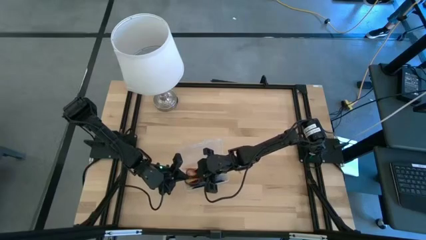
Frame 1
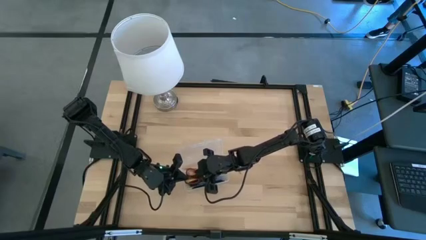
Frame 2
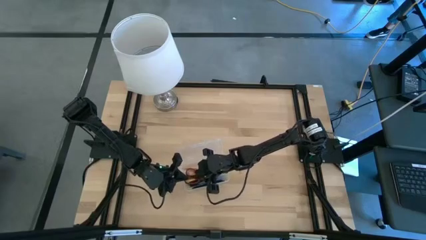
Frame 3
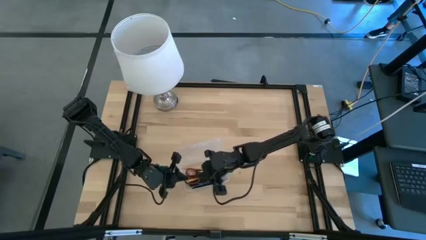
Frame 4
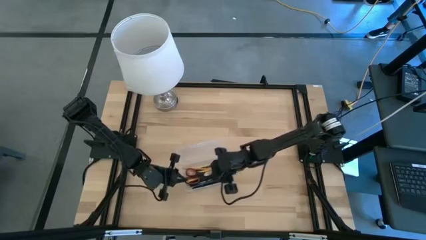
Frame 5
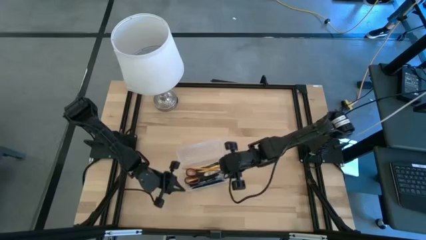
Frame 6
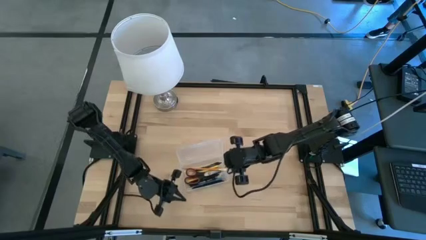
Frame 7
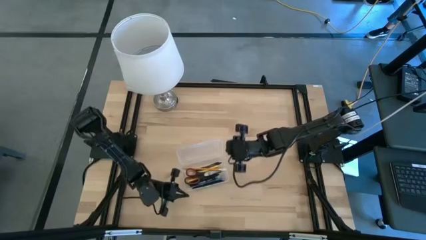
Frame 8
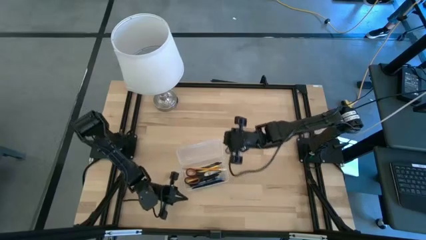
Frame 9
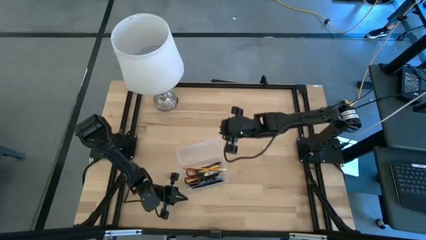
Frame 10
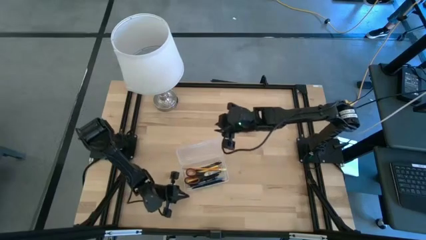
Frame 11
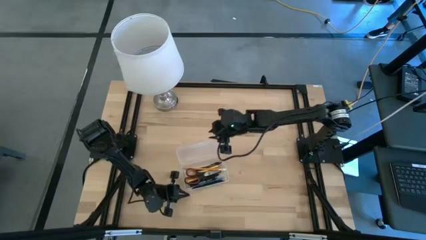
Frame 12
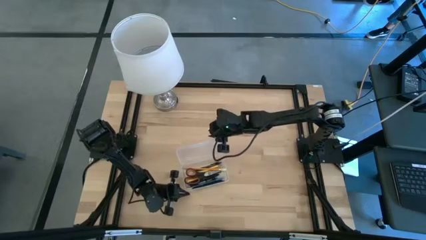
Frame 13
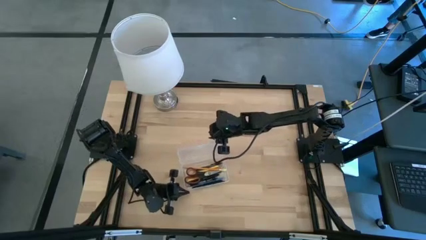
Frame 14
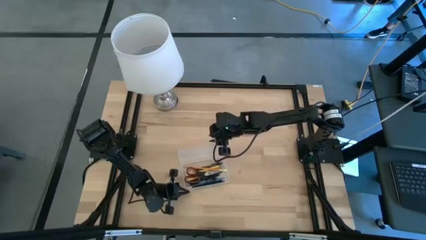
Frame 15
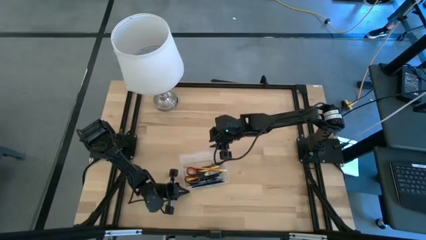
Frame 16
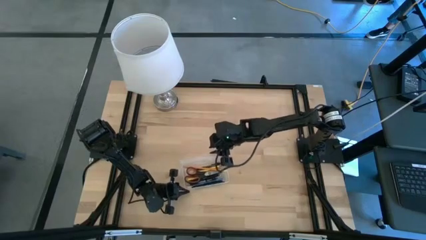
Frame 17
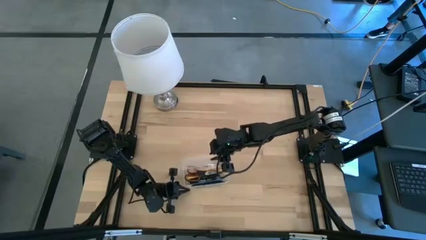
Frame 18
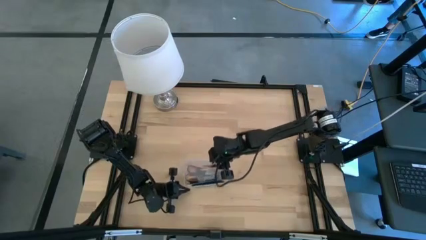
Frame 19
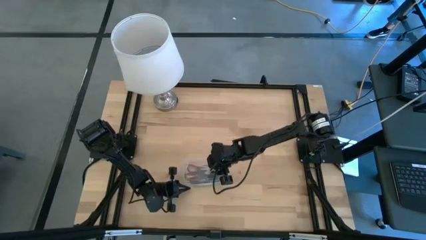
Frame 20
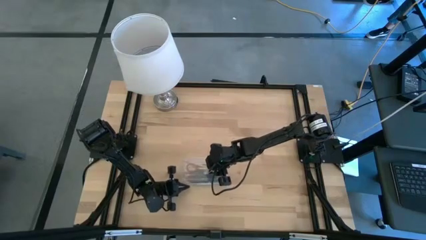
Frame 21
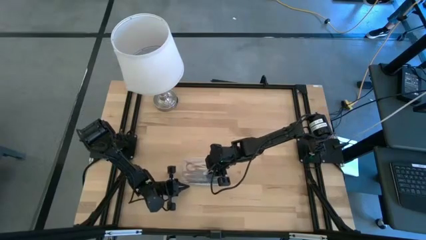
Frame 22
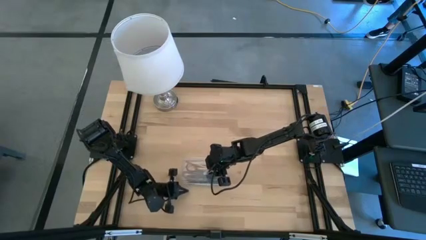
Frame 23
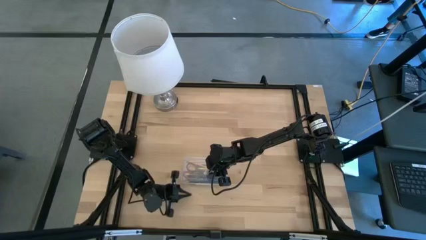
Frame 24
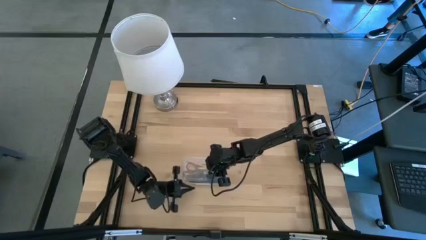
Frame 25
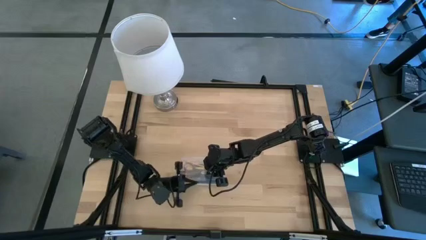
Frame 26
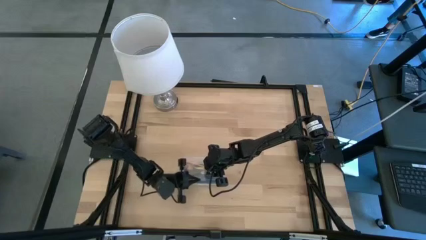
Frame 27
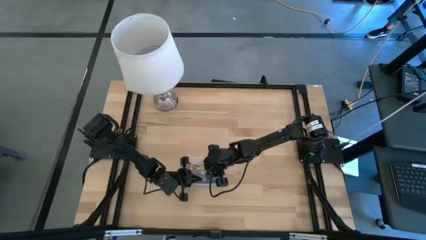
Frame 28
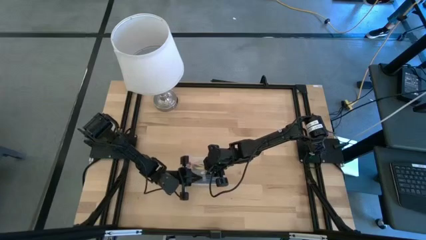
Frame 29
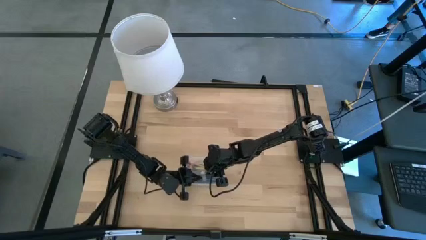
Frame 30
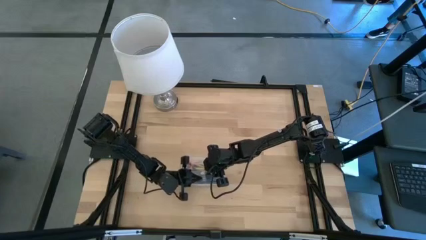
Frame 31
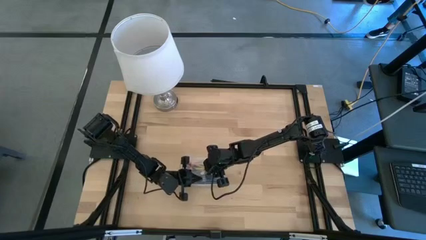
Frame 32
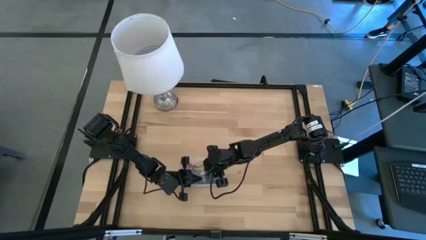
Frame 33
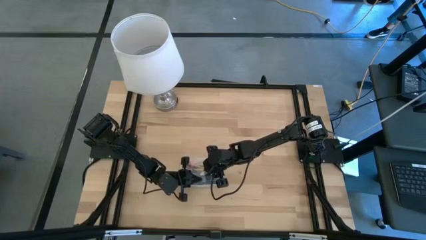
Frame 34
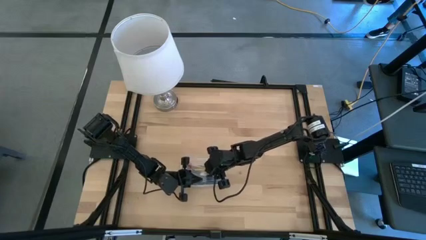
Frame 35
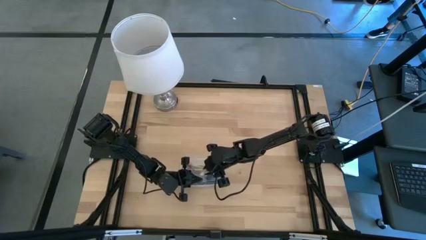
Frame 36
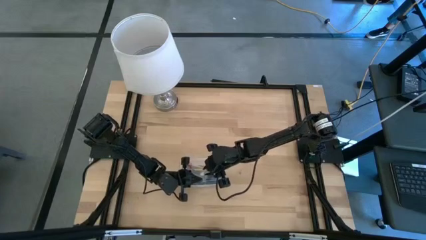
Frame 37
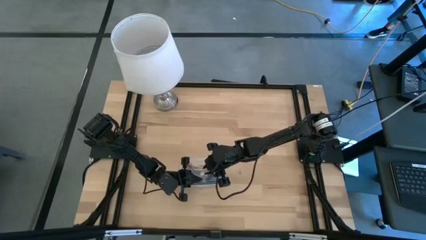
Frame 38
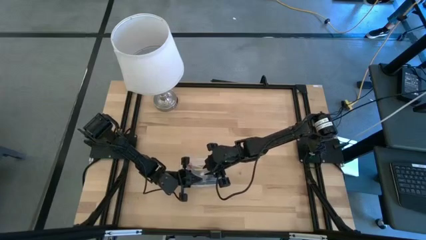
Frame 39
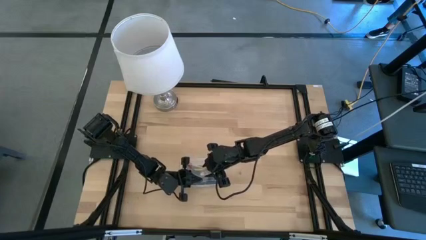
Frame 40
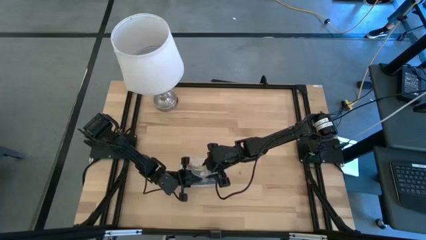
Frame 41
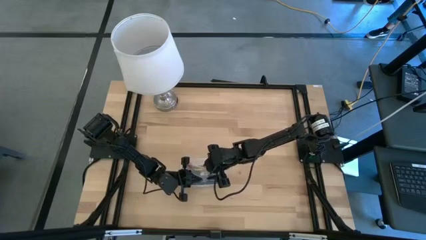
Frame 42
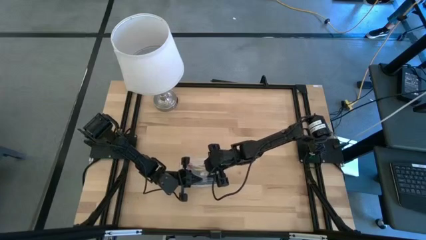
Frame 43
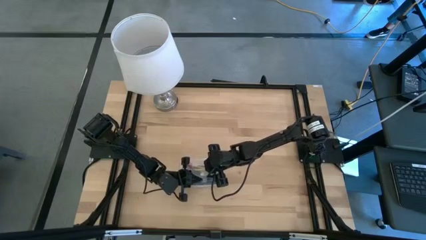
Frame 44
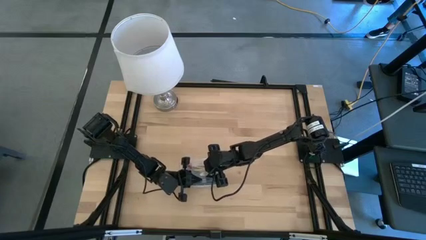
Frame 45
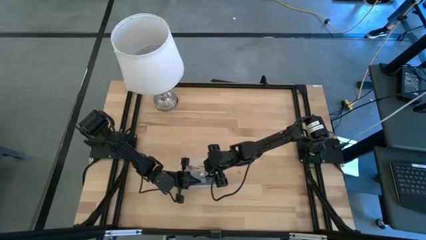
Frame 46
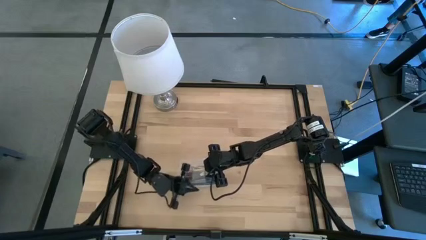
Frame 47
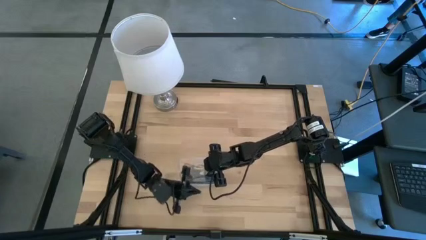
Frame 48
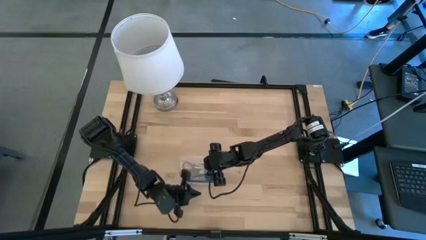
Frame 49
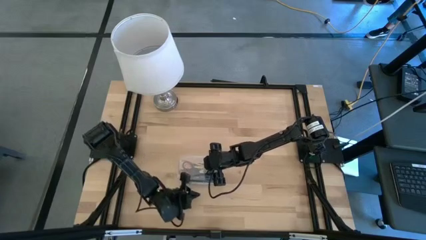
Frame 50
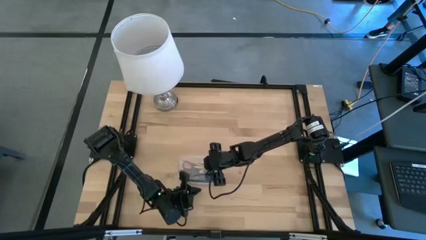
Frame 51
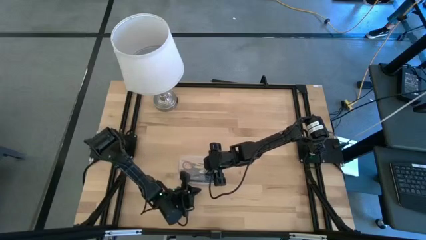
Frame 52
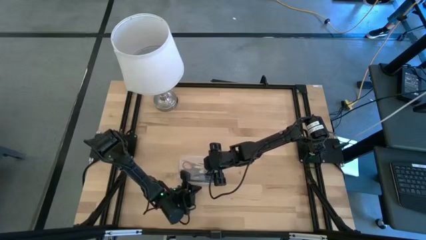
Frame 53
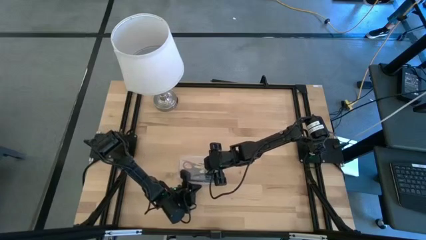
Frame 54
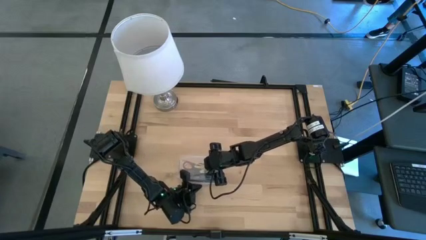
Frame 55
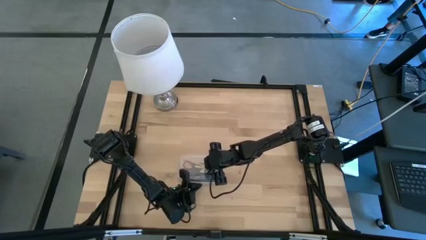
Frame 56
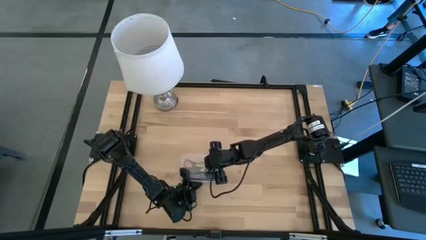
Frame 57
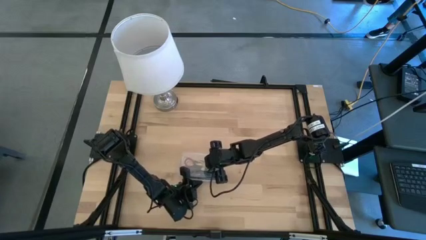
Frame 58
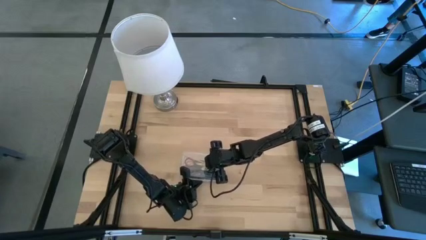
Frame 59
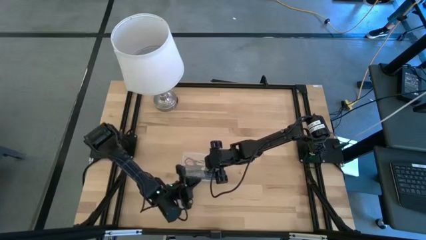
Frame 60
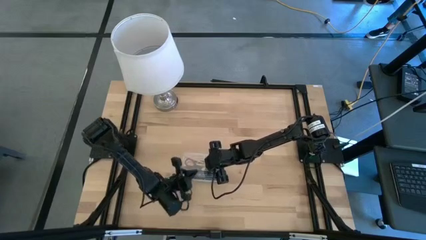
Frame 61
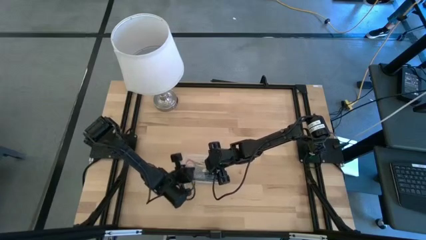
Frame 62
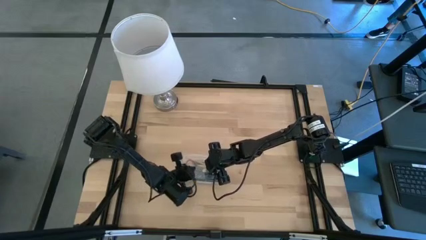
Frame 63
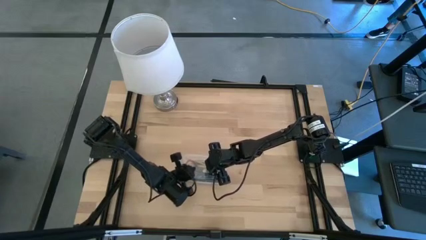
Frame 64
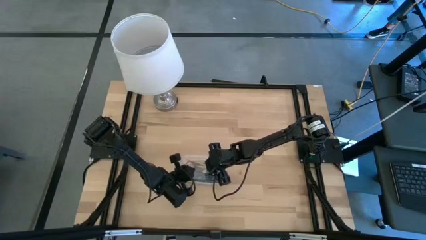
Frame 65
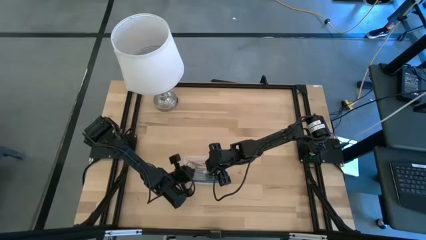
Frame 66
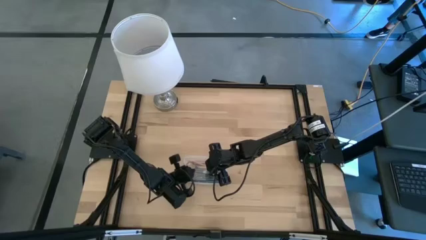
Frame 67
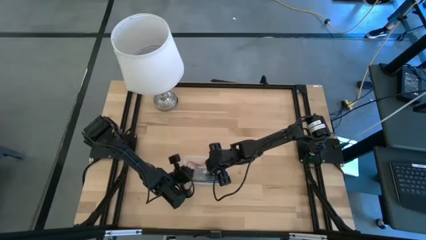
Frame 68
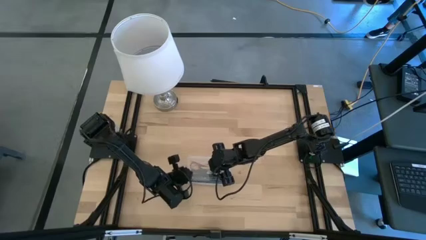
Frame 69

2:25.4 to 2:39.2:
Task: Pick & place school supplies into a supply box
Close the transparent supply box

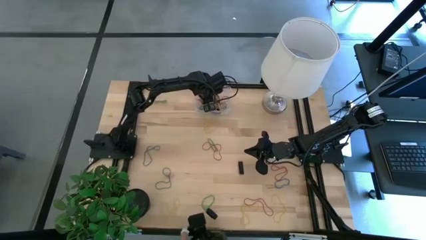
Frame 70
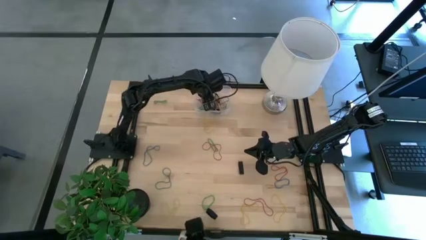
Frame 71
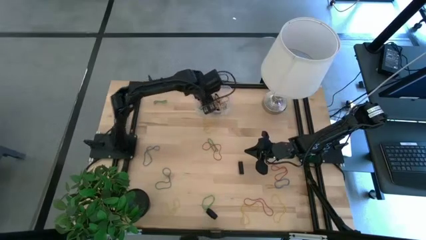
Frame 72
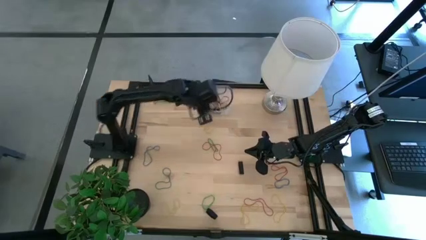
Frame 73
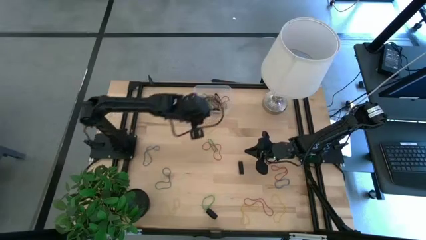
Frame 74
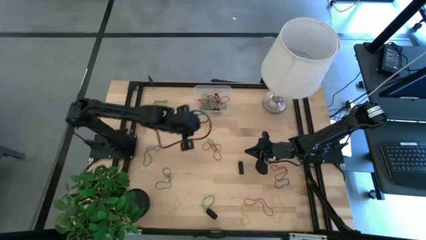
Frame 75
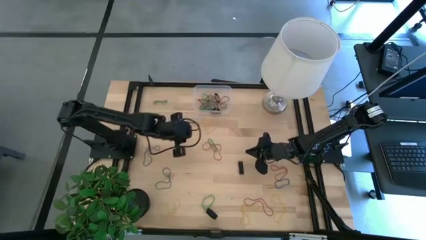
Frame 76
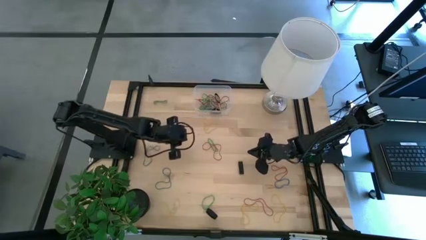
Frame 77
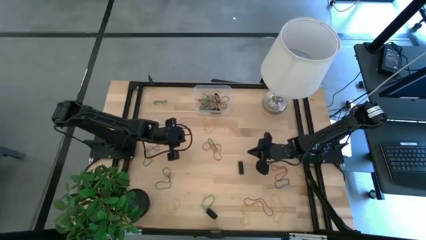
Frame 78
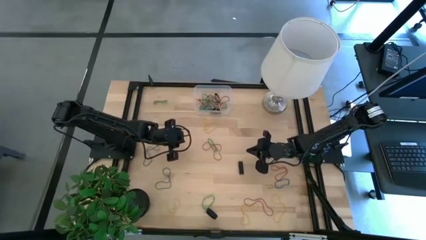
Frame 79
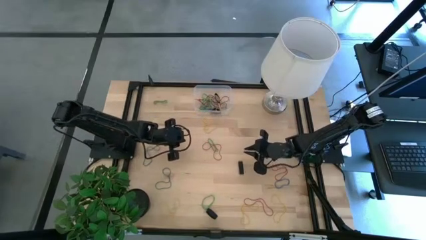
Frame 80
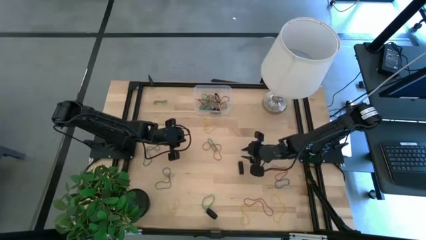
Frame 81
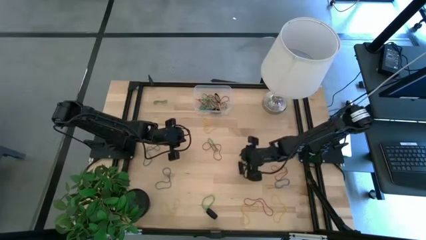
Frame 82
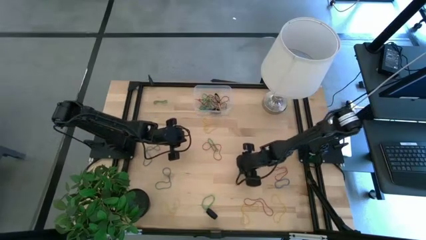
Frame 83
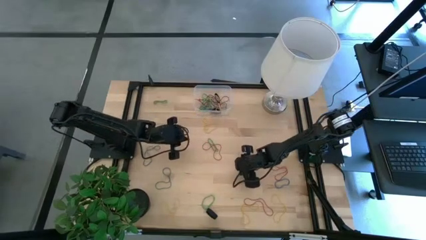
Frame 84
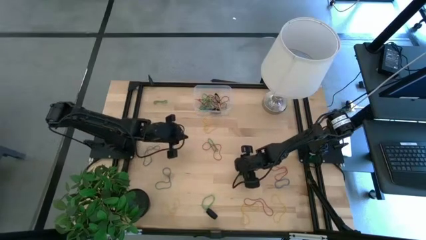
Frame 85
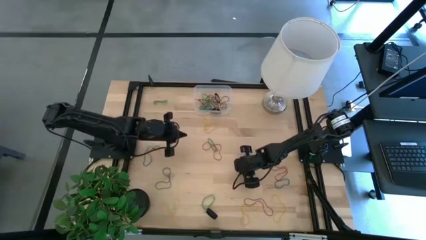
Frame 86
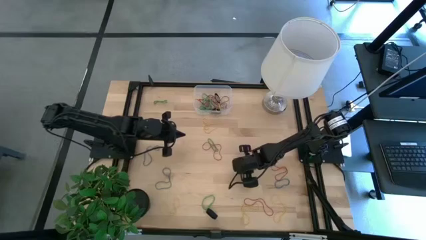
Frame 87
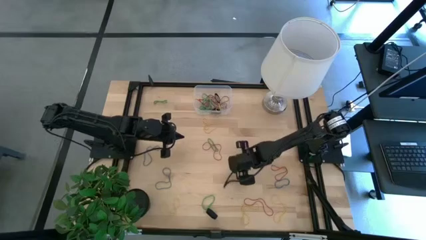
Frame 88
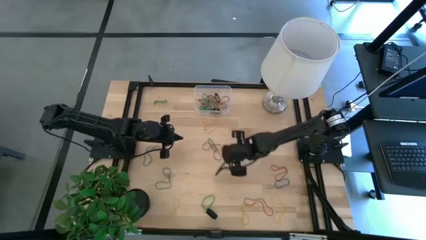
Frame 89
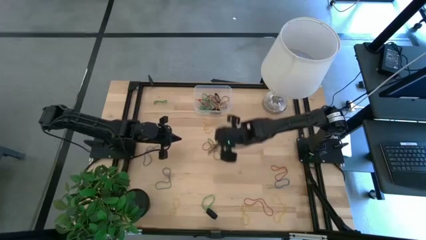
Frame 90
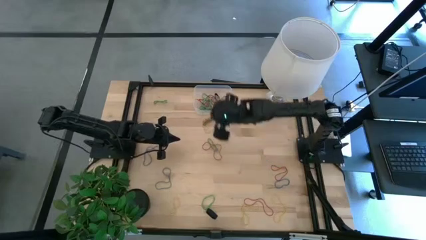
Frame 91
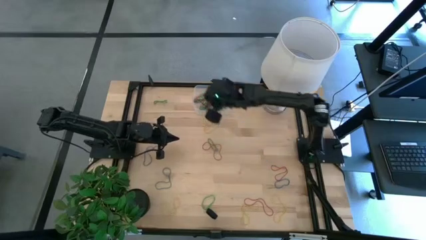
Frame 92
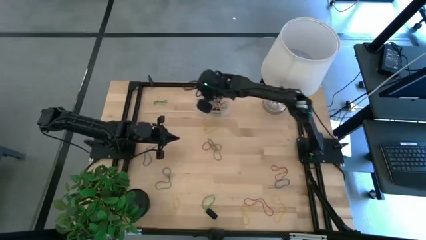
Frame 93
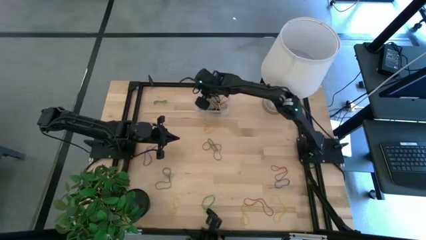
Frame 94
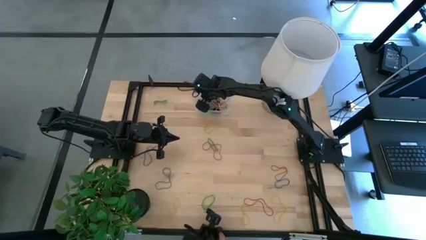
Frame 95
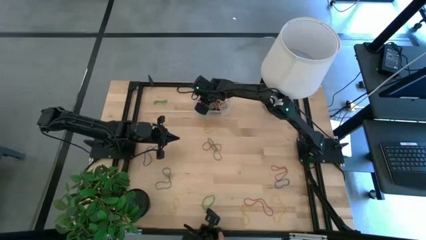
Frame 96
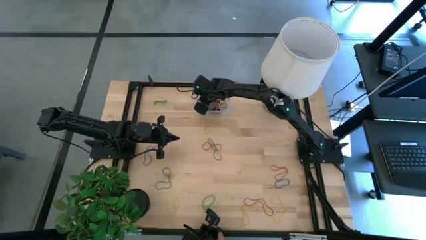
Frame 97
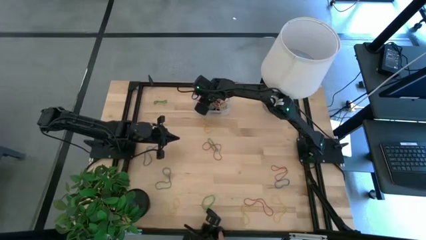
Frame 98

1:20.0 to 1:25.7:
Task: Pick and place rubber bands into bin
Put the black rubber band into the transparent bin
